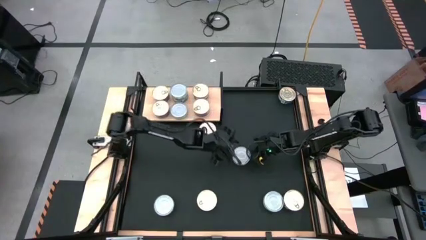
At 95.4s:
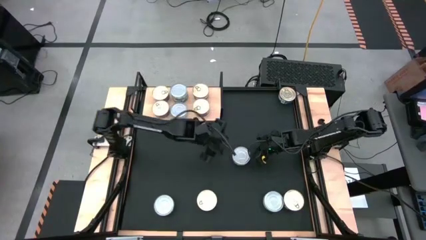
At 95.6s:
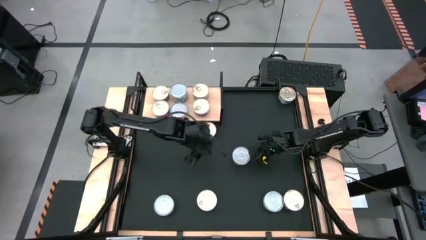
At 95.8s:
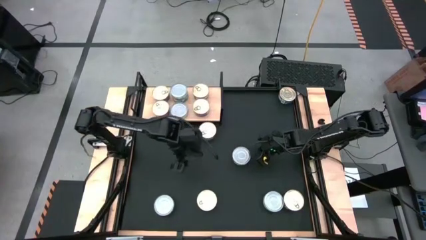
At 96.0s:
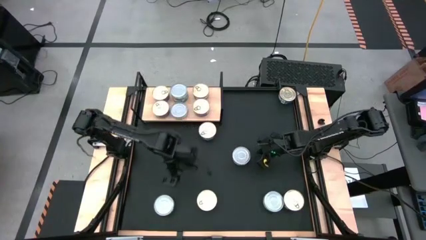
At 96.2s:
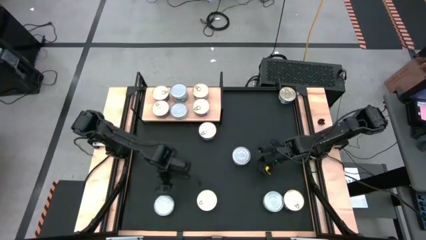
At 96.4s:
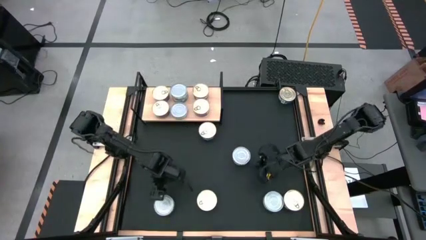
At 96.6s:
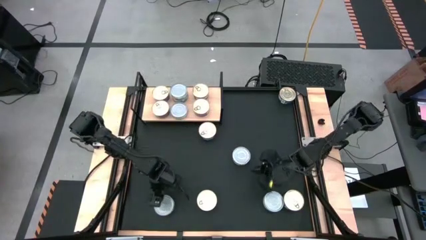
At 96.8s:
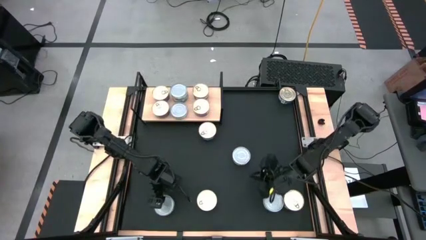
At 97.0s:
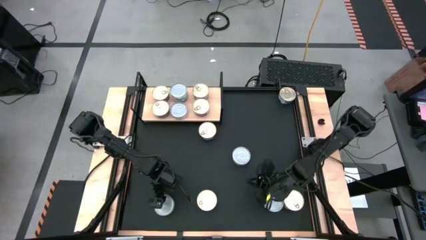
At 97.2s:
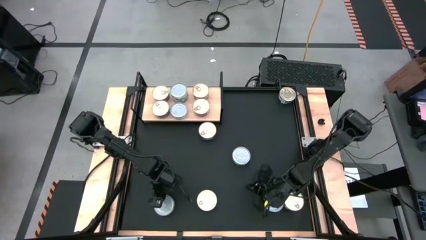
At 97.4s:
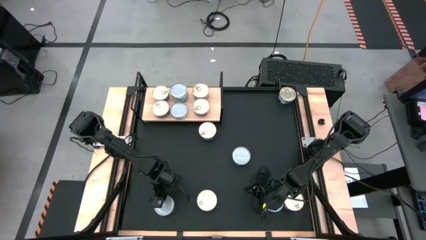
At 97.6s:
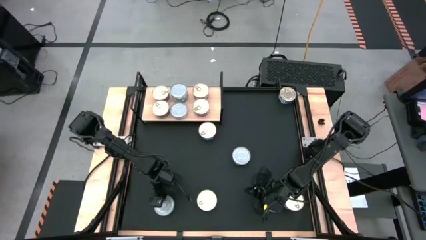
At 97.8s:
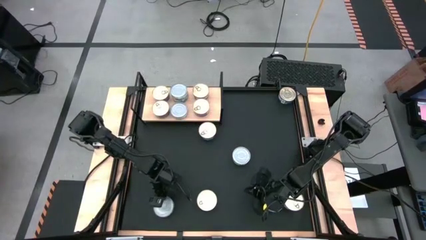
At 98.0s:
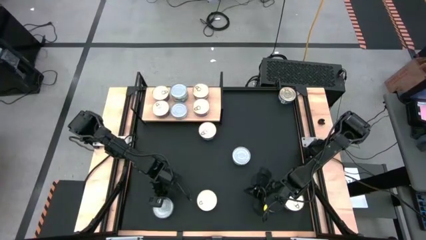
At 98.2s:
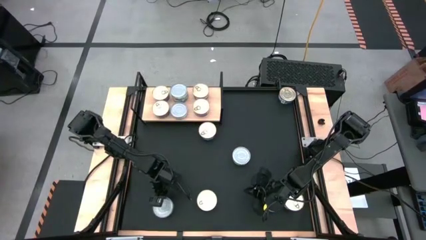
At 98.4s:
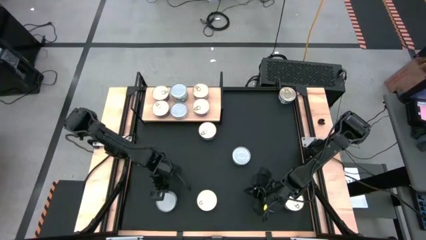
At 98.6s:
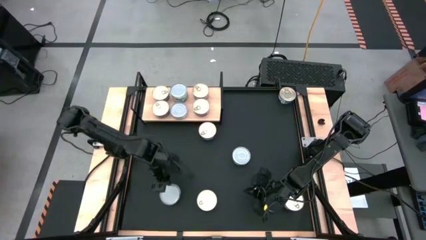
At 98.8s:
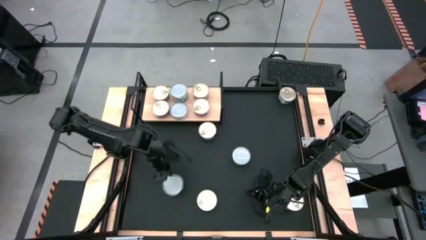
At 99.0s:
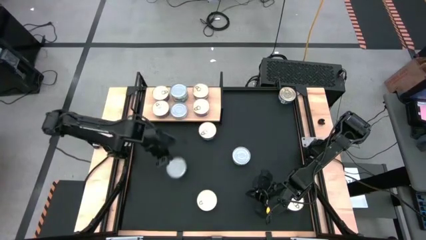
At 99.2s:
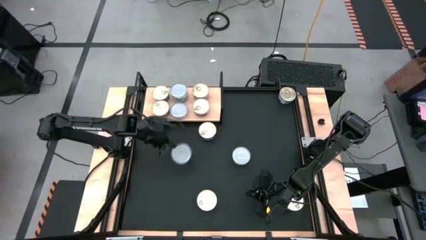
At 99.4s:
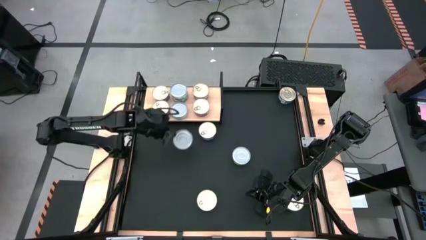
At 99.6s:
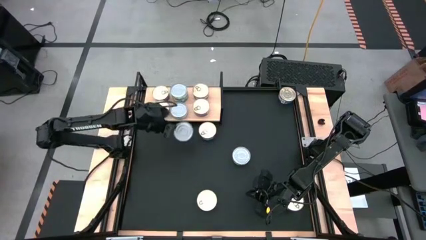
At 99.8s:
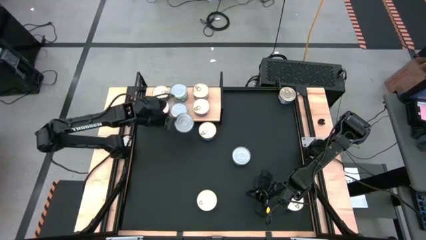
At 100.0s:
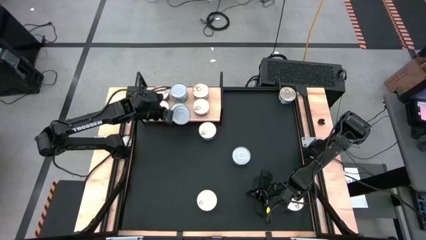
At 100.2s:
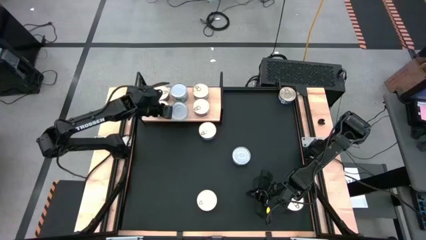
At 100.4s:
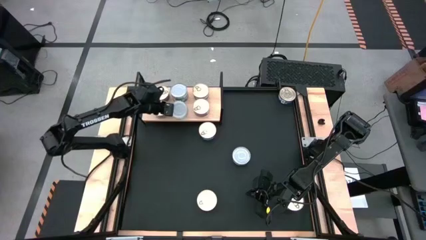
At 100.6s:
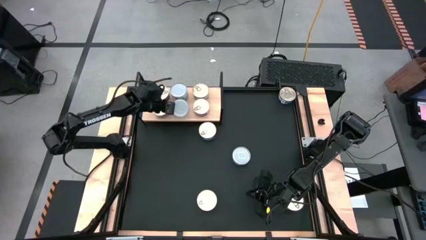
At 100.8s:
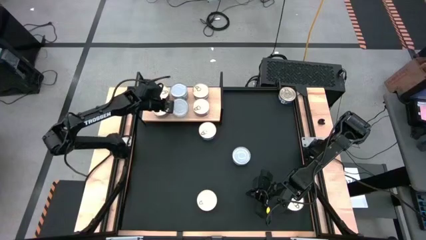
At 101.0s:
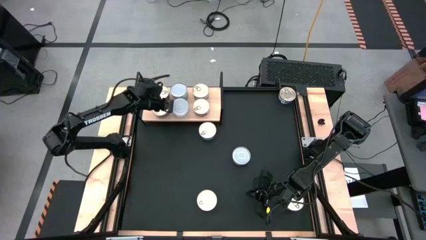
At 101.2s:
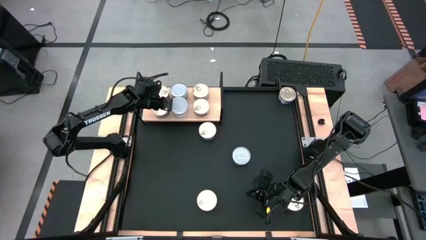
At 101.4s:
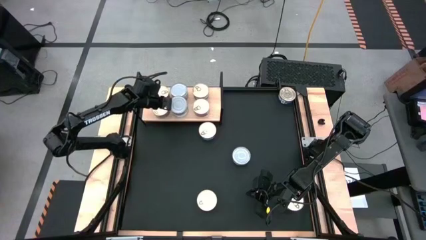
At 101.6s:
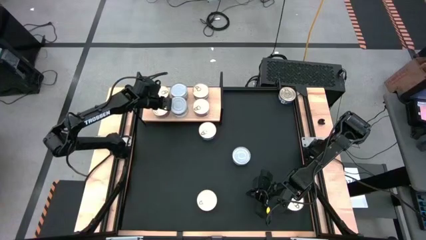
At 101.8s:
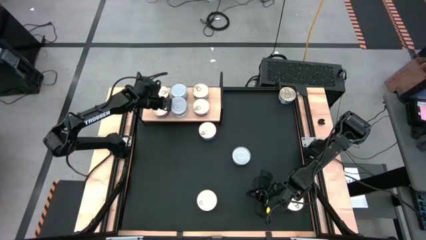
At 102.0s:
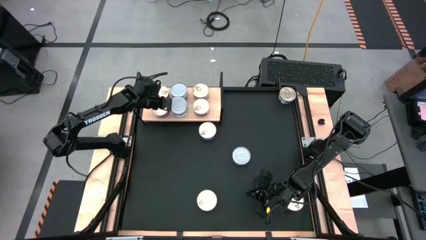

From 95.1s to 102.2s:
Task: Stack canned seafood by type on shelf
Stack the green tuna can on top of the green tuna on the shelf

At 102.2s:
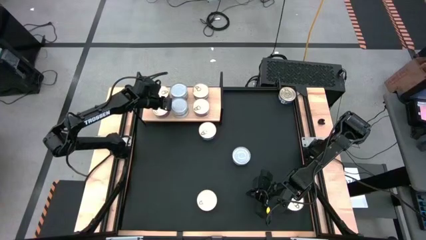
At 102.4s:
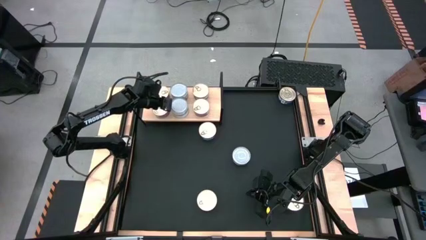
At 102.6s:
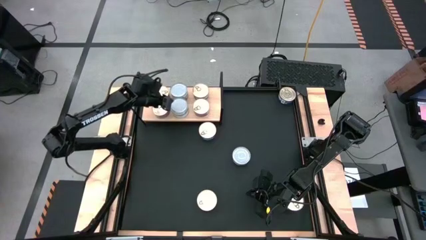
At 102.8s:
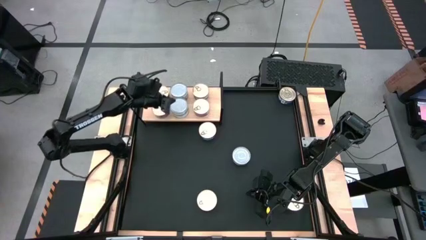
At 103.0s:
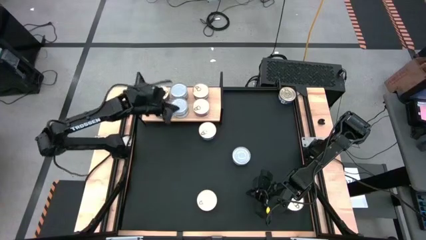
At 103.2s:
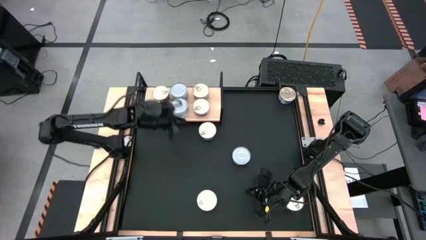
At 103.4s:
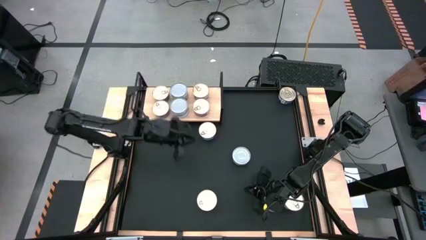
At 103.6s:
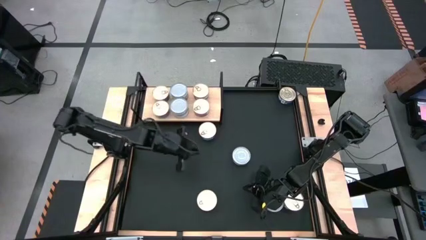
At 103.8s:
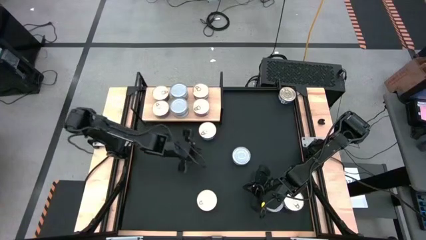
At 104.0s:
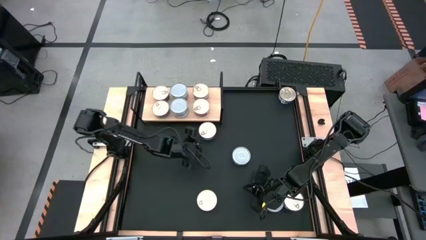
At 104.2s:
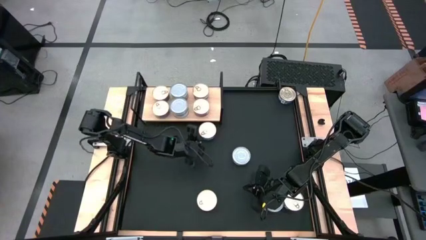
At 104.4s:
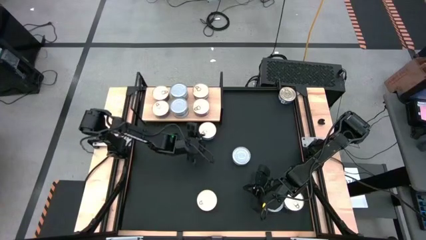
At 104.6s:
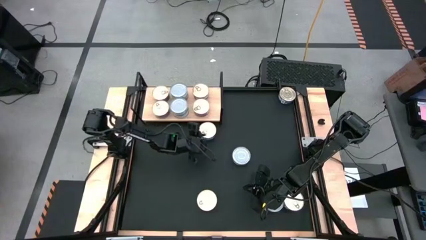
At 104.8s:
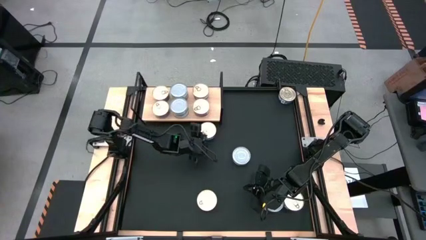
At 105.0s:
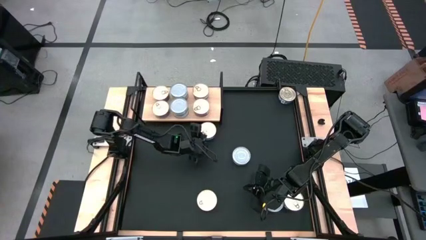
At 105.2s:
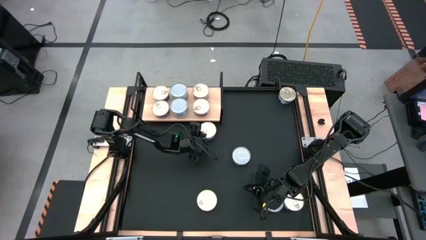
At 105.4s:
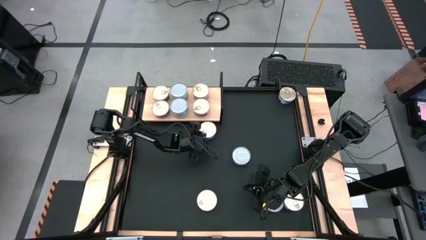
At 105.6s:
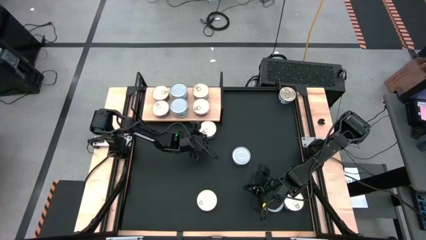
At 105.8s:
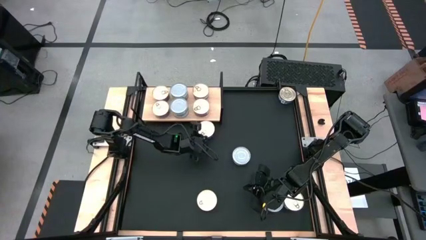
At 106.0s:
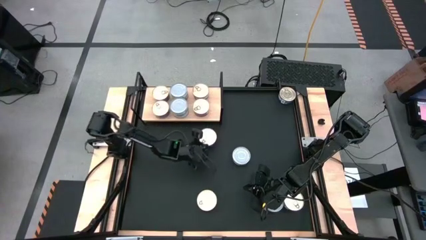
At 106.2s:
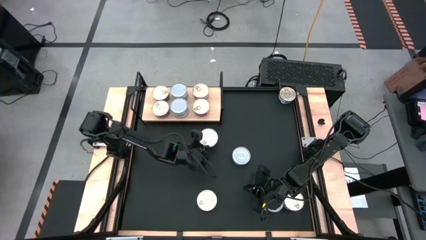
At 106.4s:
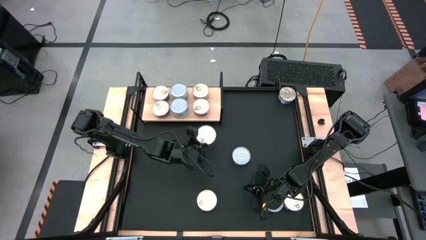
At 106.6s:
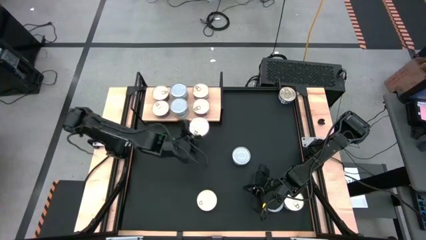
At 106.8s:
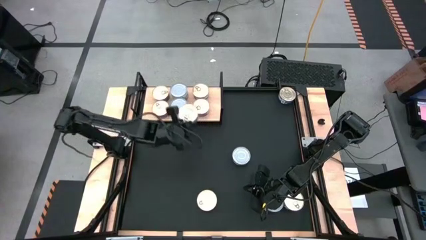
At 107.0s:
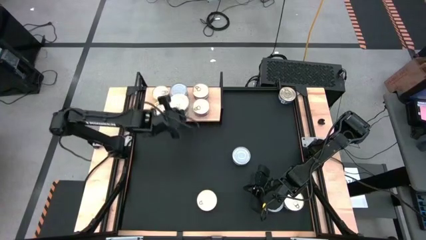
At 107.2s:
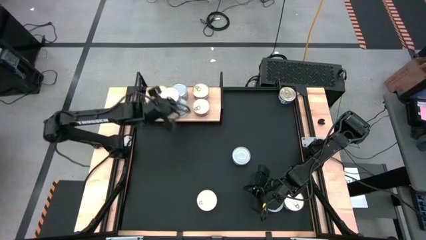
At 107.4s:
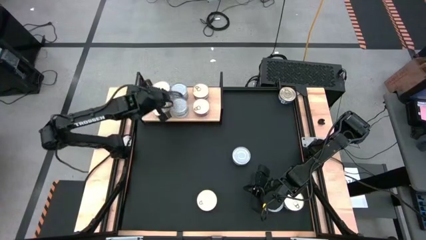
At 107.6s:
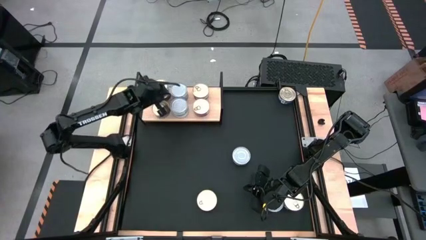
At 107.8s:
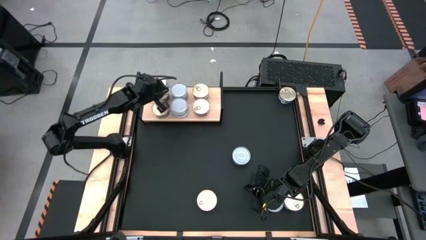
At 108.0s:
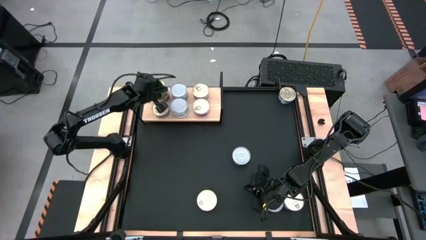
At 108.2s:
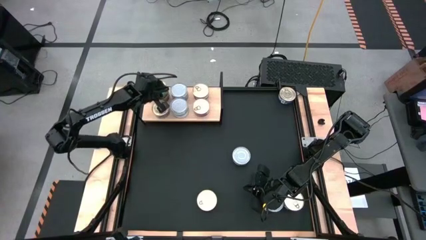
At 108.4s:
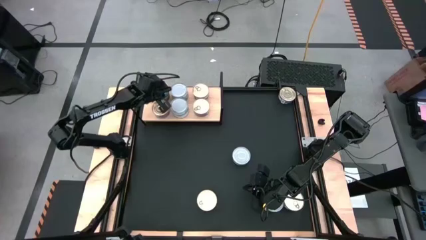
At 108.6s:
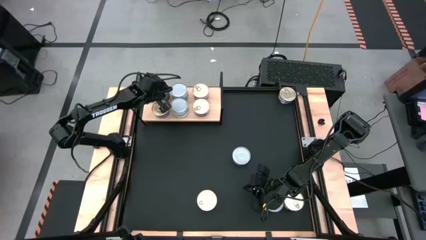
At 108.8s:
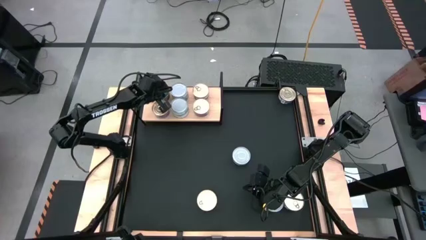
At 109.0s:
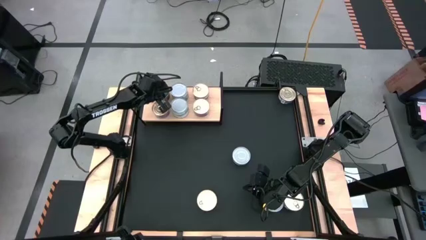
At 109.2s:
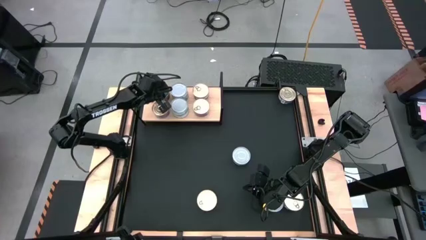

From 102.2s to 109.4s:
Stack the blue tuna can on top of the blue tuna on the shelf

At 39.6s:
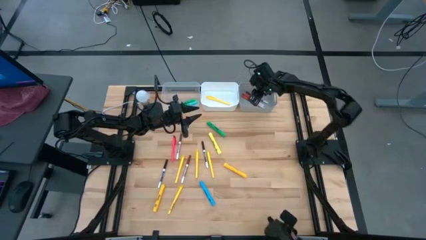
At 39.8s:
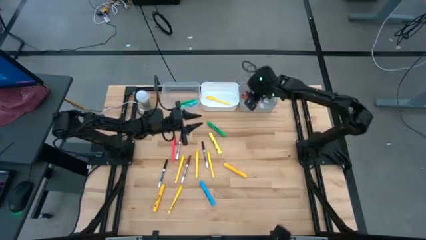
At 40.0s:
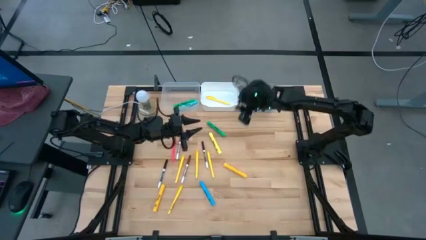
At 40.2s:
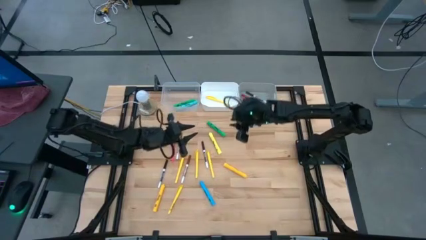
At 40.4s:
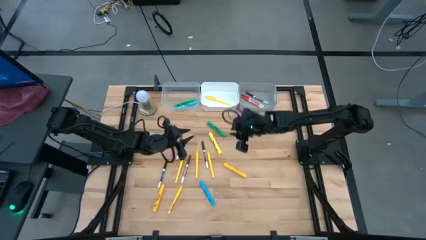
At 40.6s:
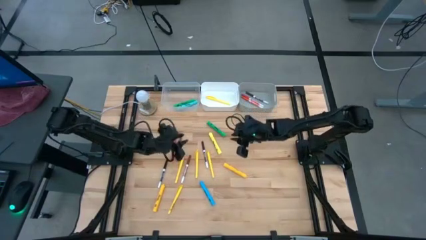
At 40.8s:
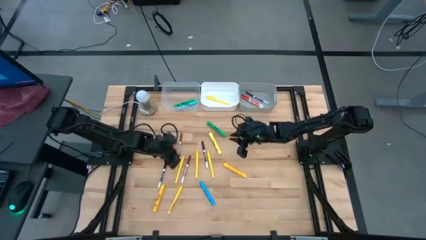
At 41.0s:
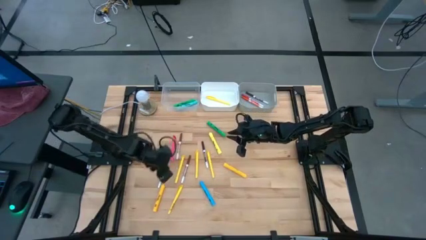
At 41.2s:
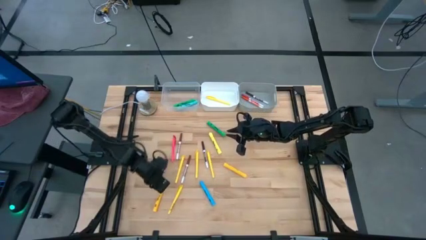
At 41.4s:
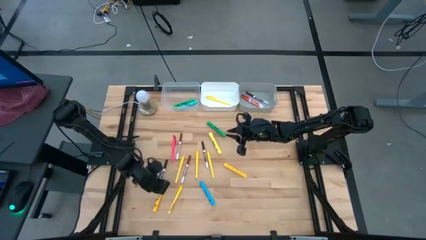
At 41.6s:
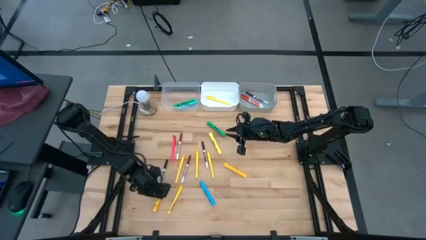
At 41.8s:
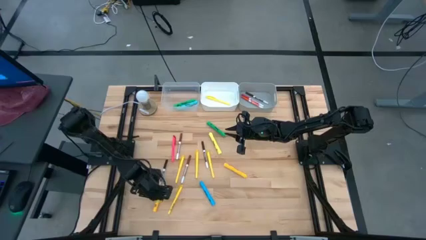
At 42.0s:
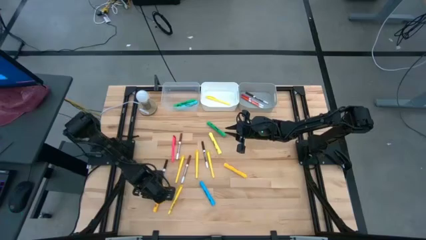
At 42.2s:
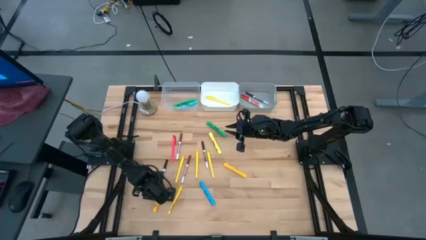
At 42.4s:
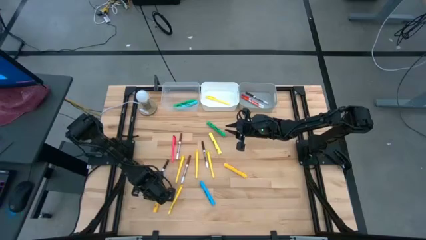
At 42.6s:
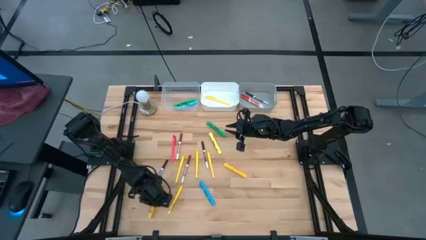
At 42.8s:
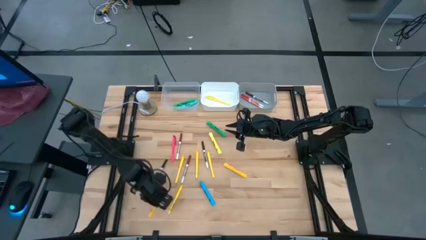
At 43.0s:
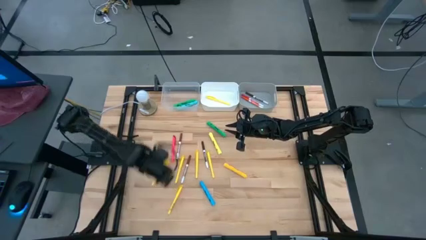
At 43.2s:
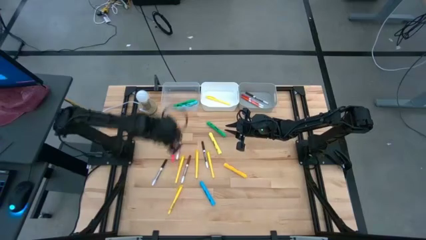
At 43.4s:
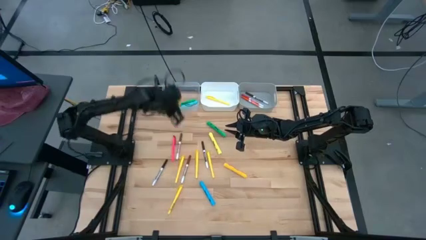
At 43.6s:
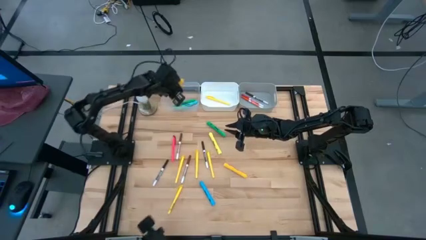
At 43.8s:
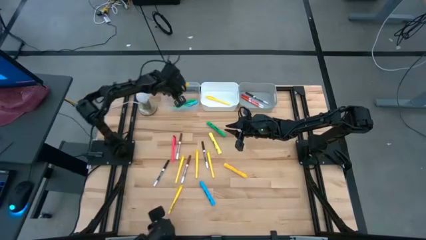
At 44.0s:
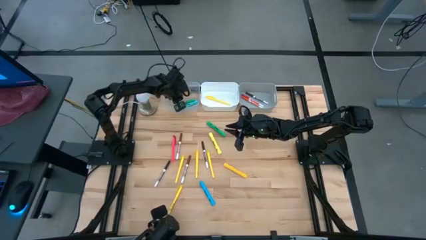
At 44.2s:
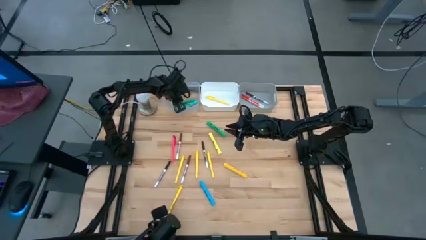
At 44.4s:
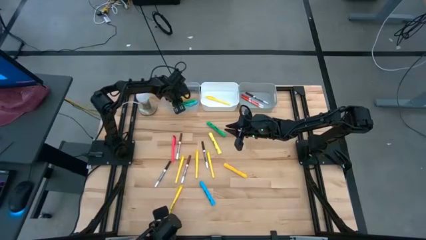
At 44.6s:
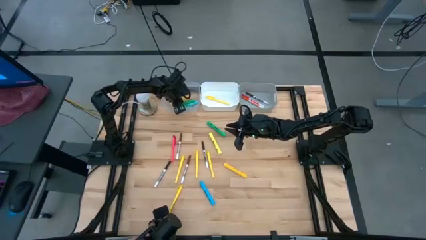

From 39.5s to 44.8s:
Task: Pick & Place Markers
Put the yellow highlighter pen into the transparent bin
